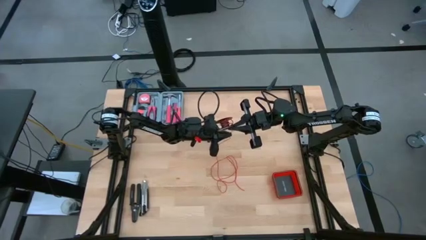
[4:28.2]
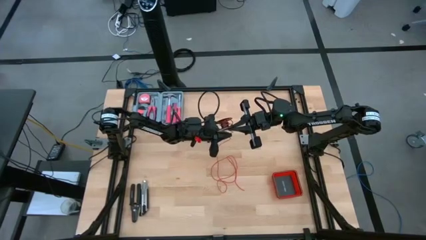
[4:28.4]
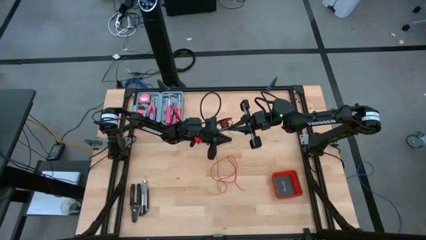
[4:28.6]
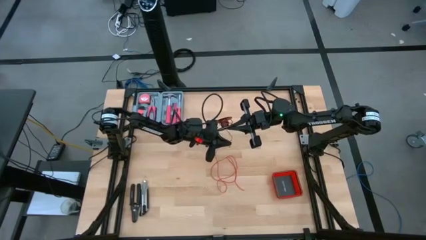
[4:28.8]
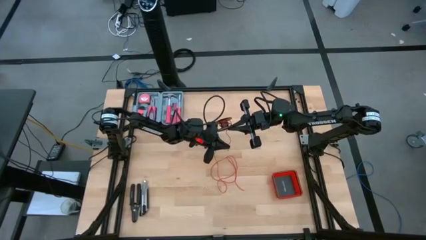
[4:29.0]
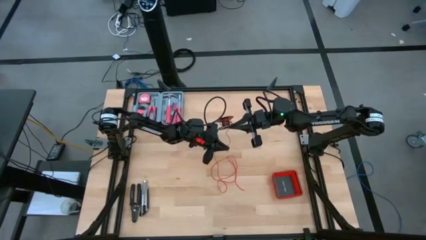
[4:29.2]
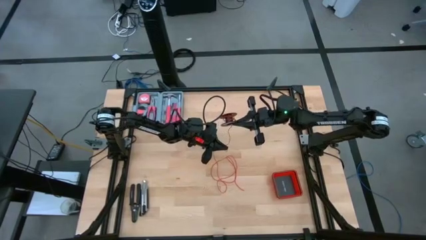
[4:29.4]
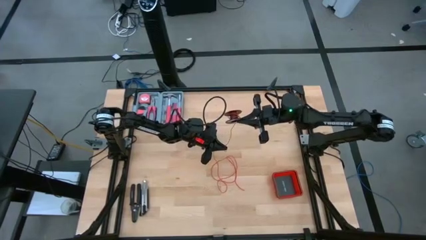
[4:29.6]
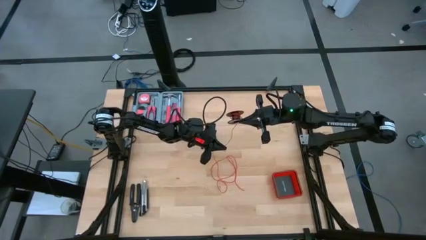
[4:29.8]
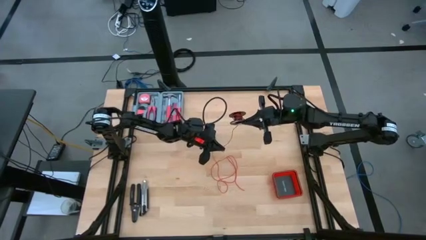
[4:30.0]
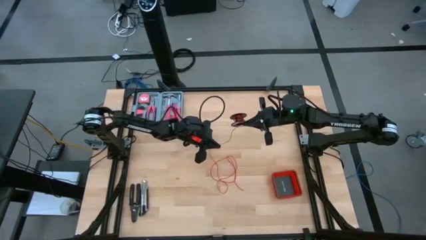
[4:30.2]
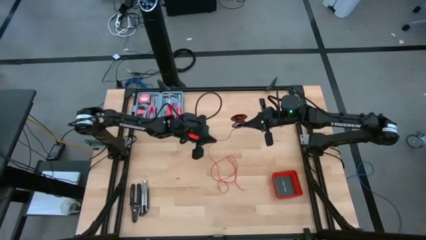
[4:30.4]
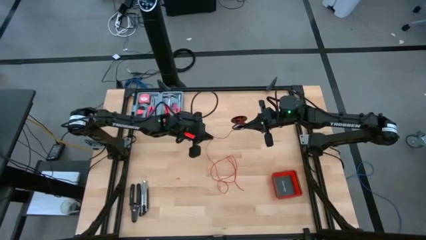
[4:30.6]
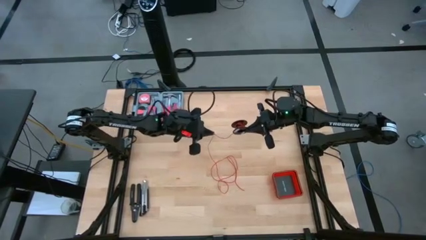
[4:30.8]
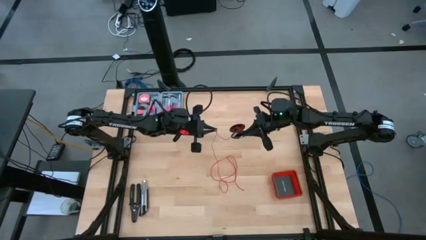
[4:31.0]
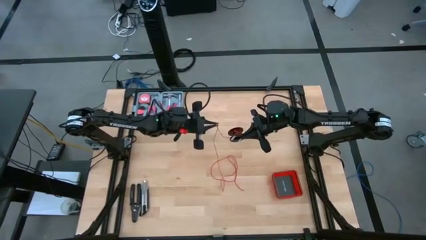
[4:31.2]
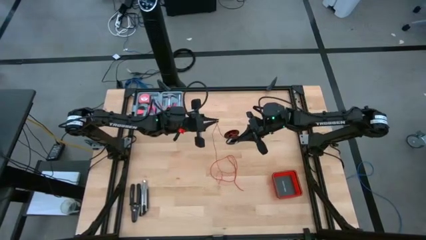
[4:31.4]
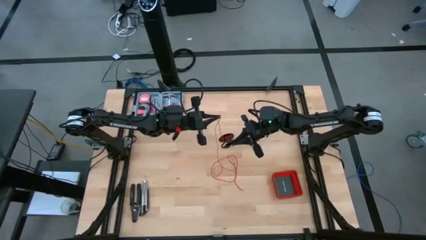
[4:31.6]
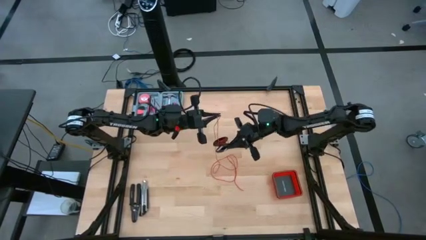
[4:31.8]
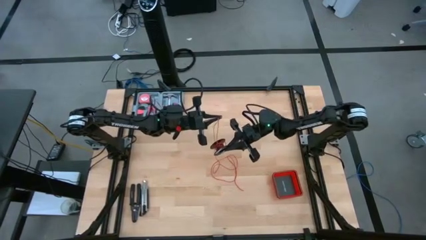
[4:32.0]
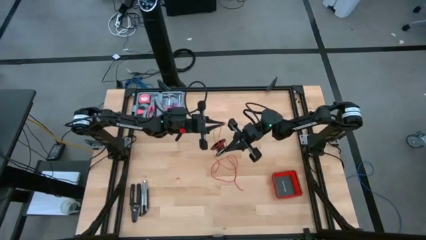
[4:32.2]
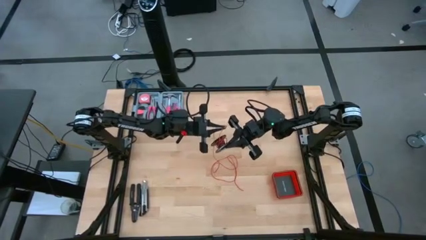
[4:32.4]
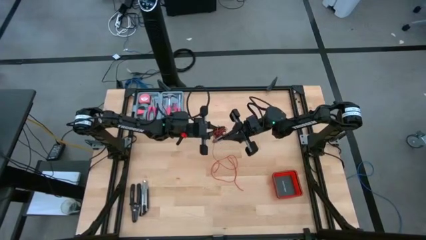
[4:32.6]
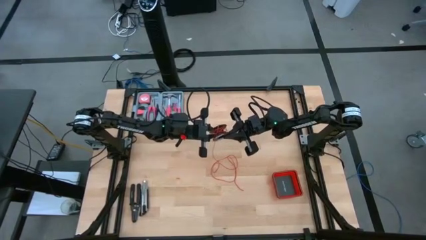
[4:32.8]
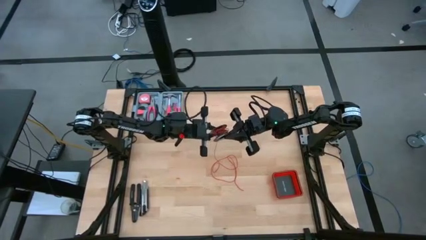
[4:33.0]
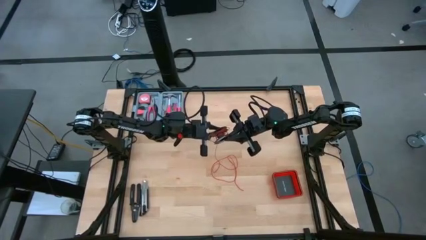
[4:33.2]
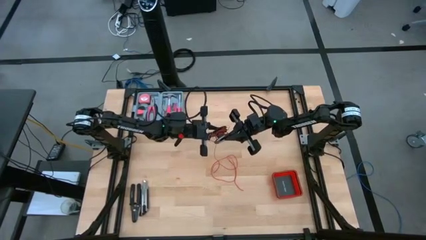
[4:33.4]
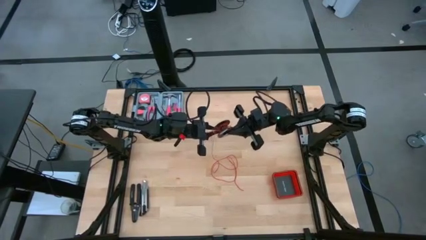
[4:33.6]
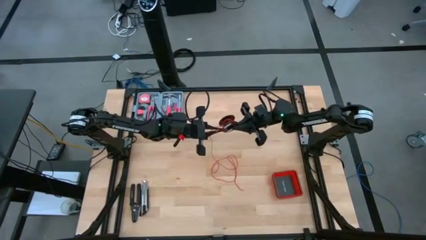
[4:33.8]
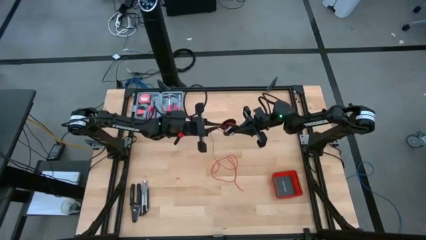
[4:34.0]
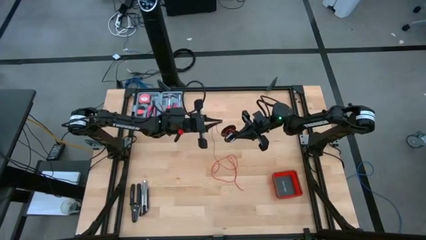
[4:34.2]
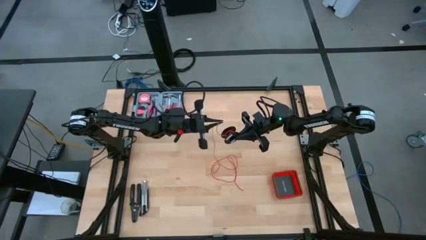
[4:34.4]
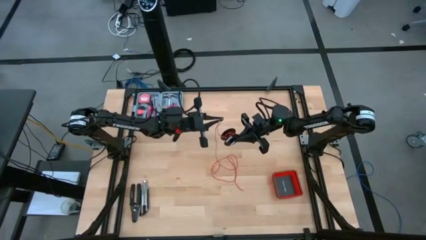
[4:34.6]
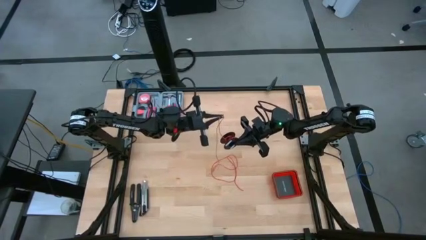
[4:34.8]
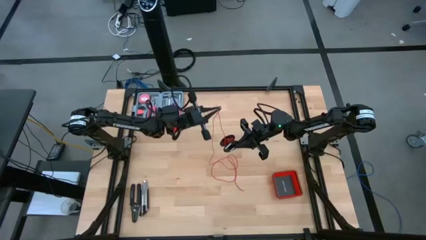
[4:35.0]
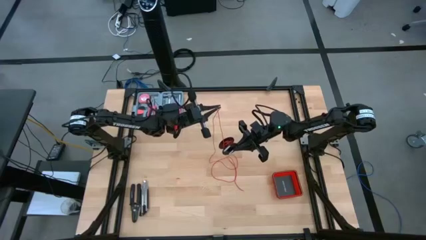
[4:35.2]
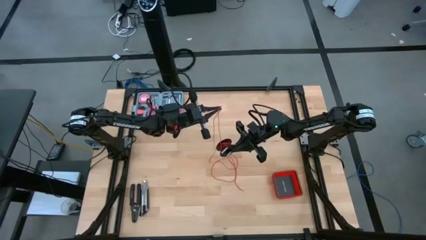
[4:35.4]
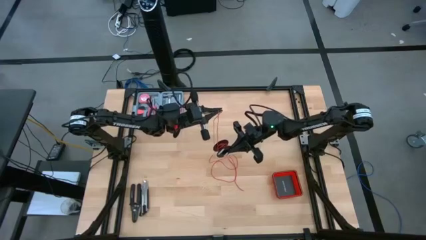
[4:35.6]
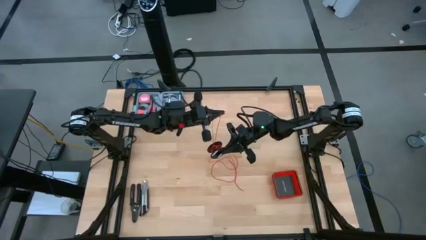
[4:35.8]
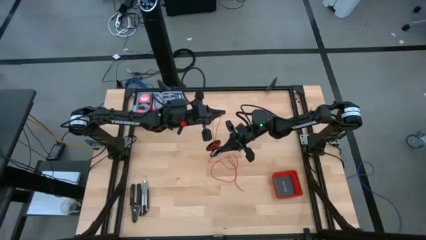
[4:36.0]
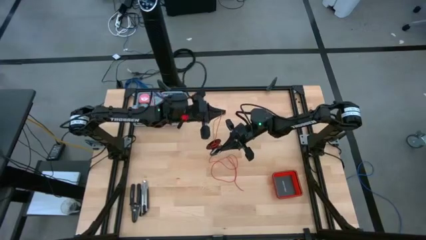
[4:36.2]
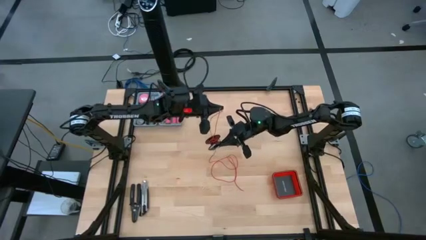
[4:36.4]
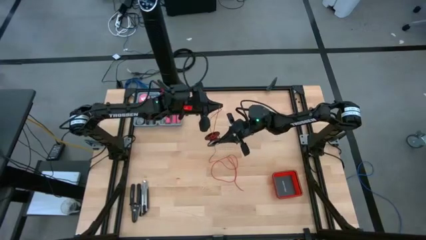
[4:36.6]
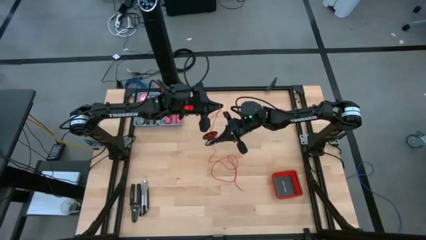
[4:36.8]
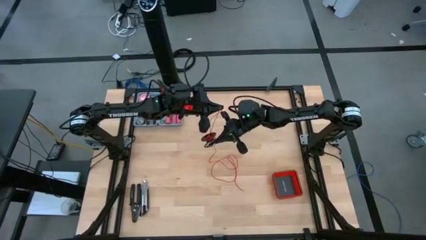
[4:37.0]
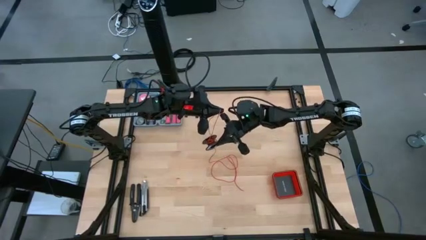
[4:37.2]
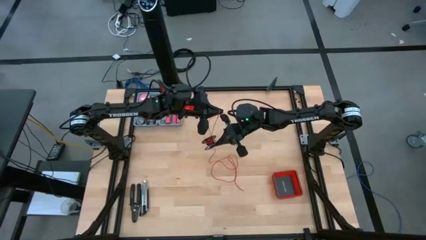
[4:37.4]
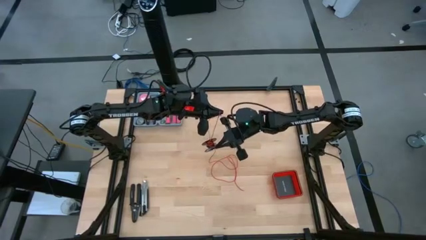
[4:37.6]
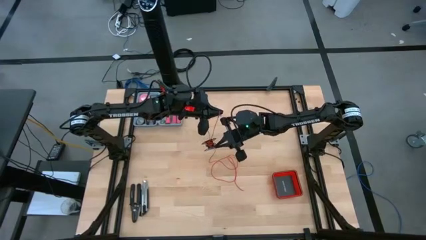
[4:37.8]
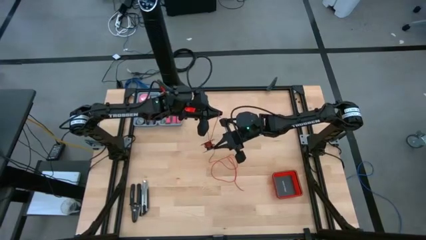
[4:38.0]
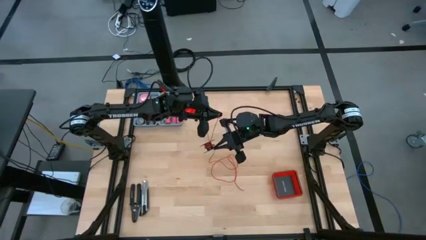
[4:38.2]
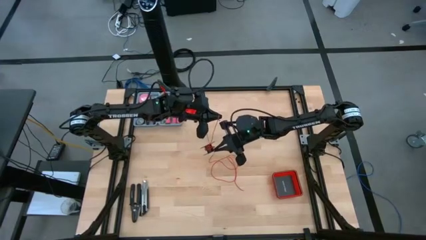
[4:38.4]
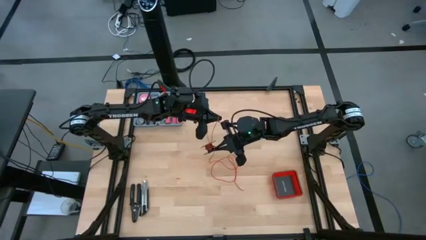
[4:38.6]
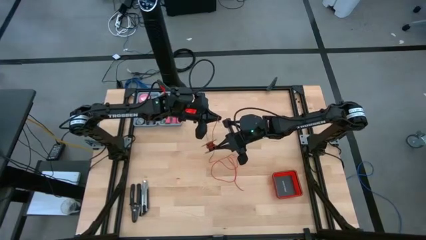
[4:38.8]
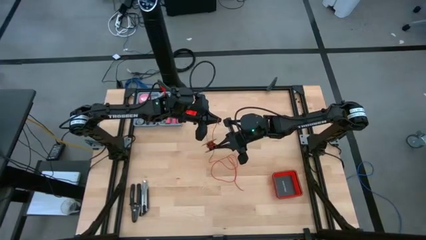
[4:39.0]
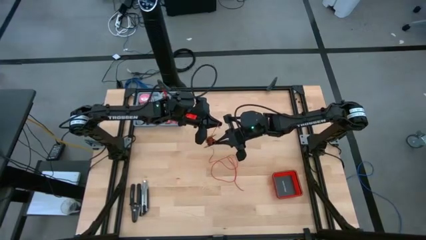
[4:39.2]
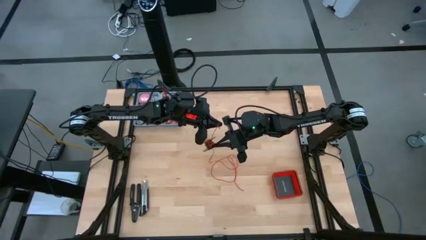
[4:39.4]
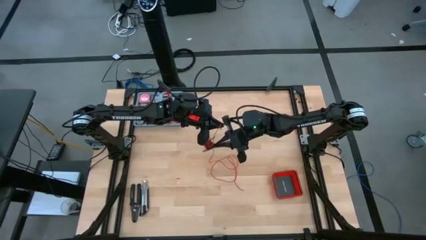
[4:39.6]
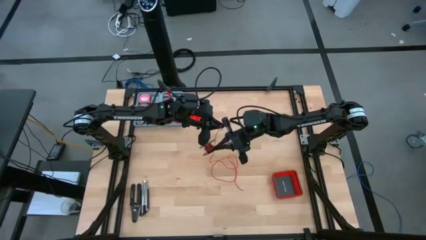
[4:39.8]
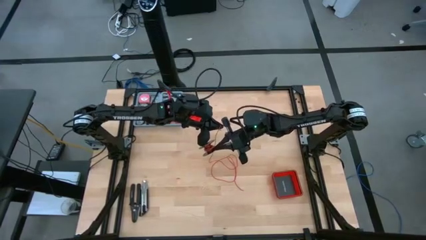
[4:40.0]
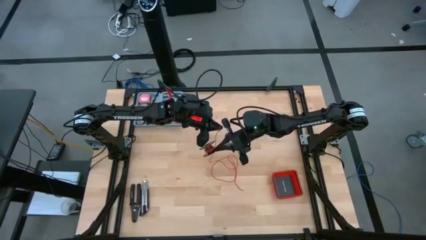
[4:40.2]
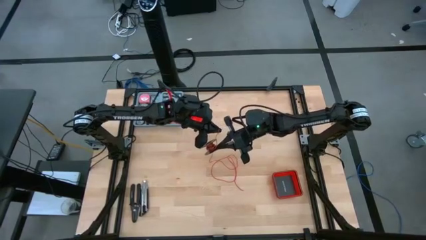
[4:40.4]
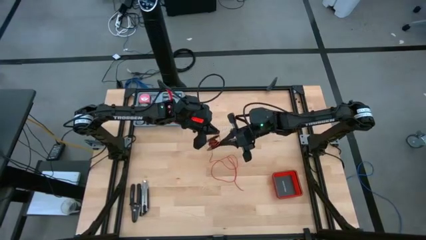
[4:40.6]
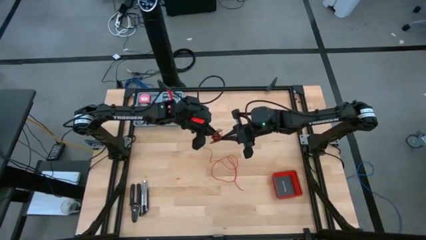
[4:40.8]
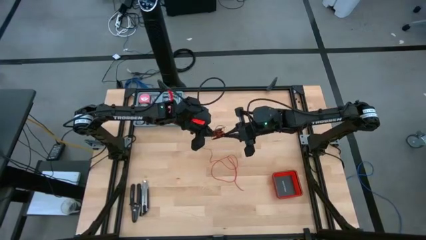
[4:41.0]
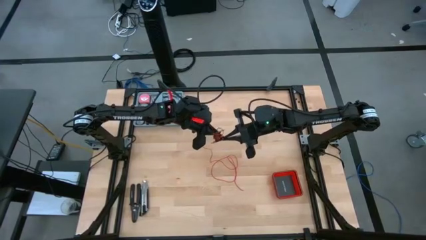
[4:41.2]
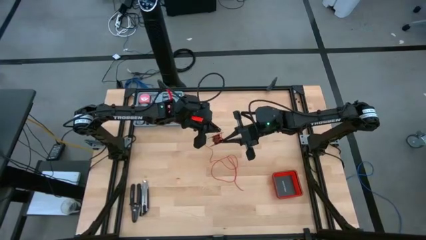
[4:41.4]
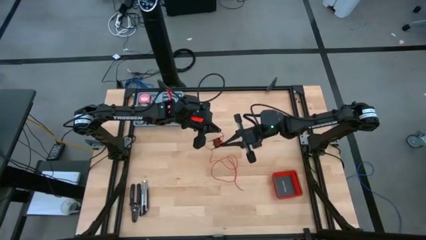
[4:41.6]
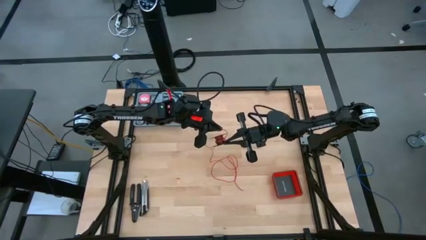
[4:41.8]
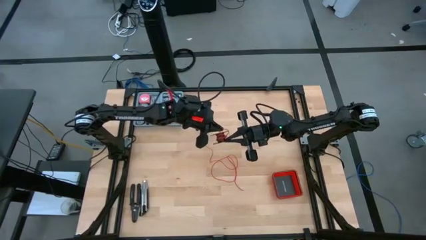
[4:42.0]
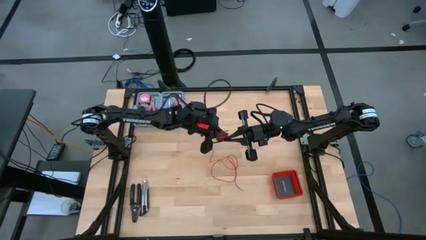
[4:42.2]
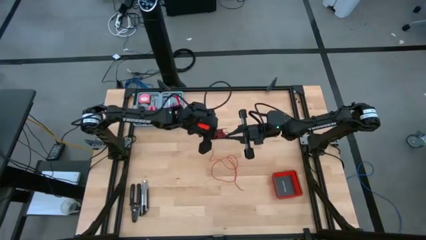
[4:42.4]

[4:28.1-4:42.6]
Task: Coil cords
Coil the red wire onto the spool
